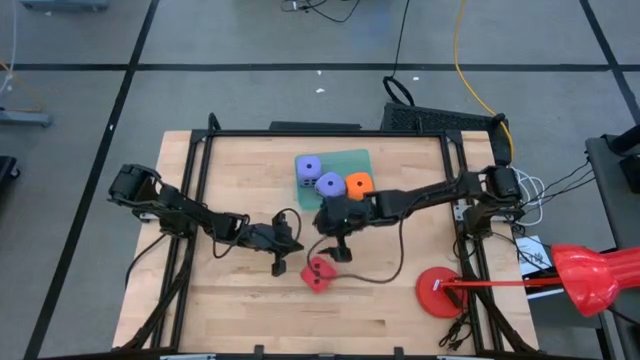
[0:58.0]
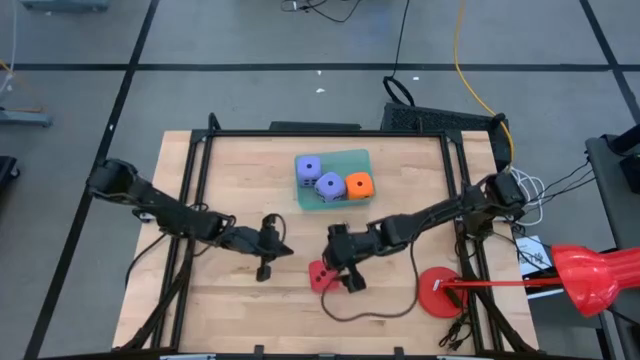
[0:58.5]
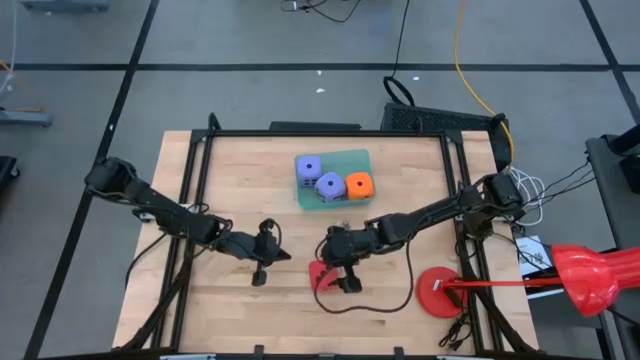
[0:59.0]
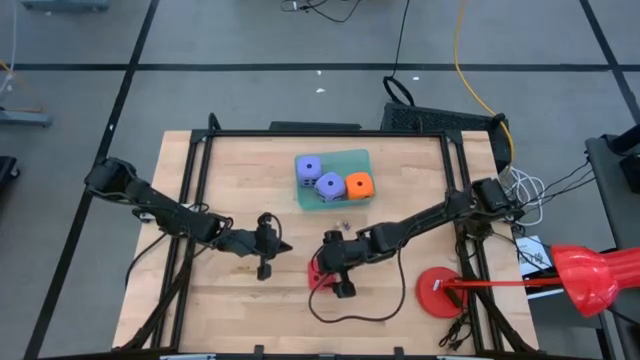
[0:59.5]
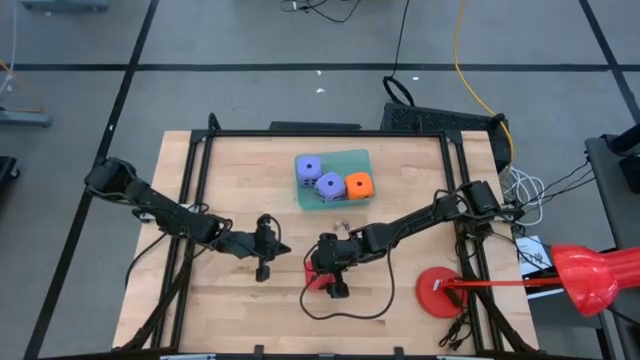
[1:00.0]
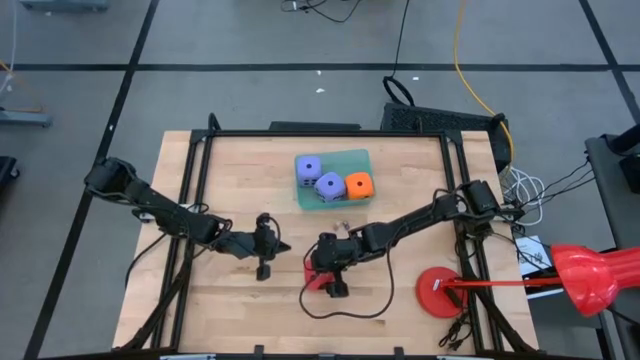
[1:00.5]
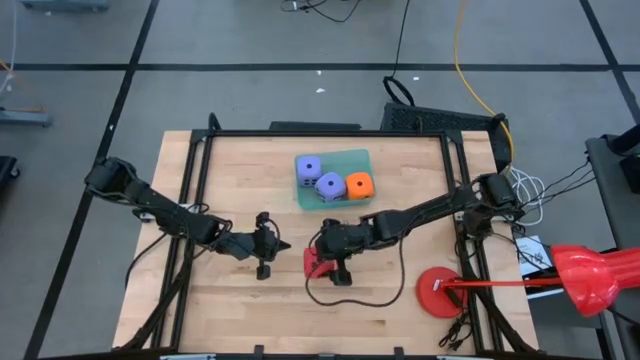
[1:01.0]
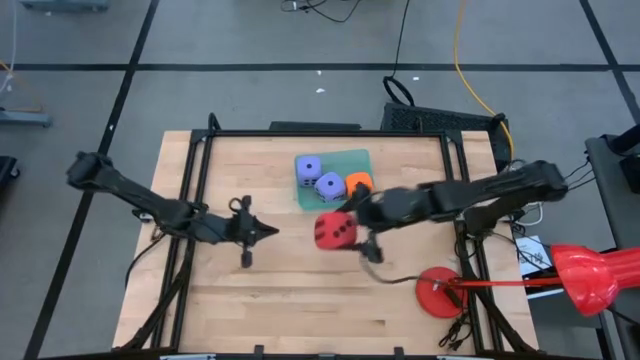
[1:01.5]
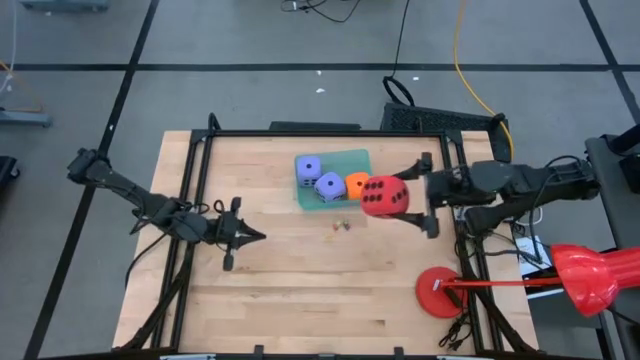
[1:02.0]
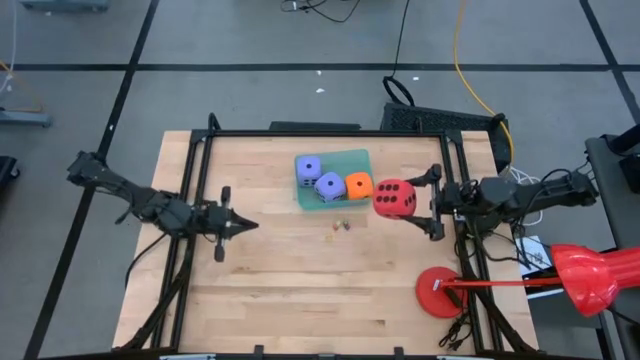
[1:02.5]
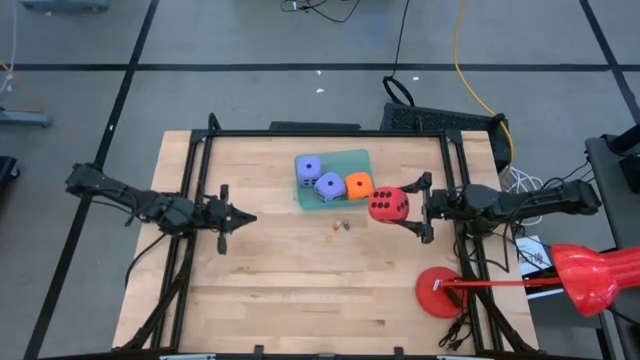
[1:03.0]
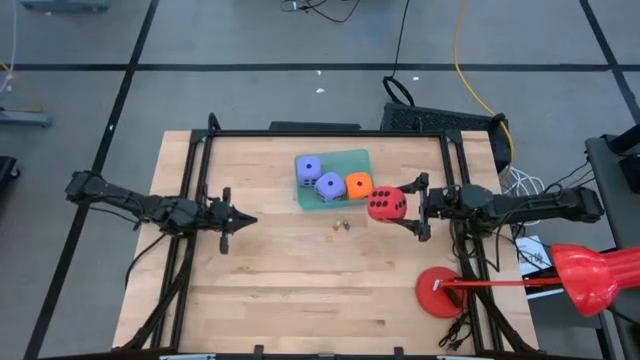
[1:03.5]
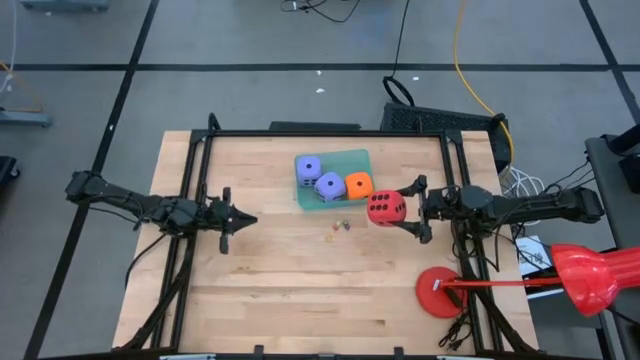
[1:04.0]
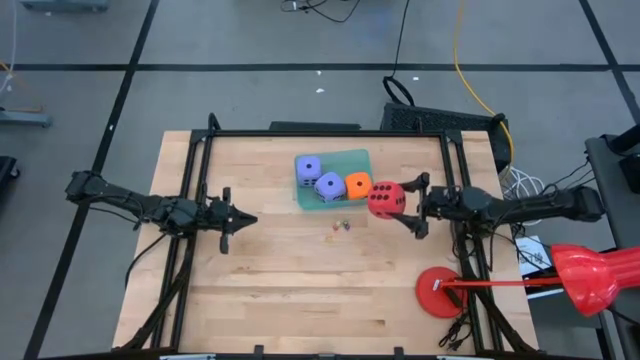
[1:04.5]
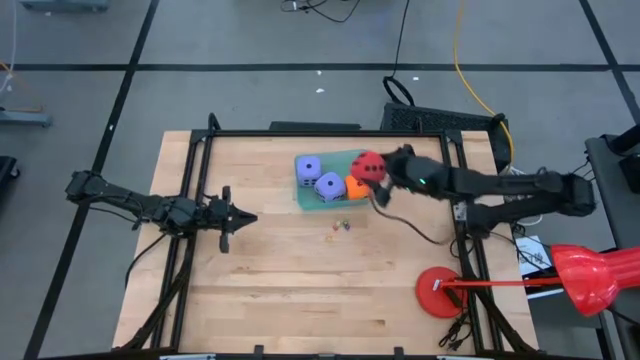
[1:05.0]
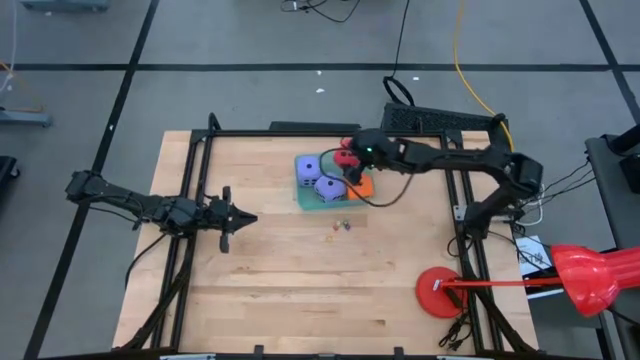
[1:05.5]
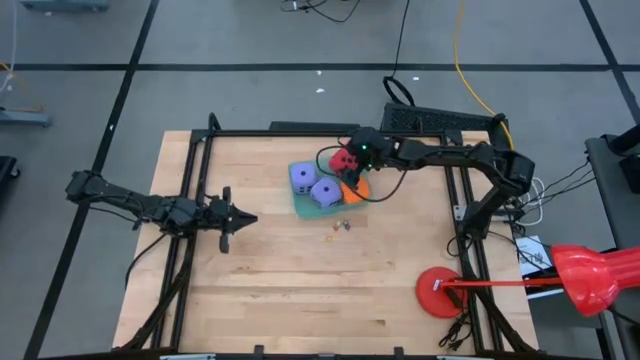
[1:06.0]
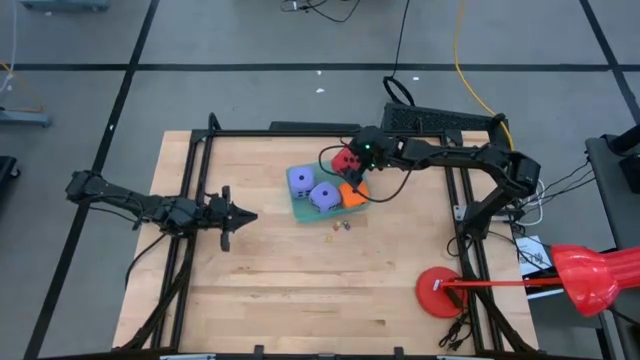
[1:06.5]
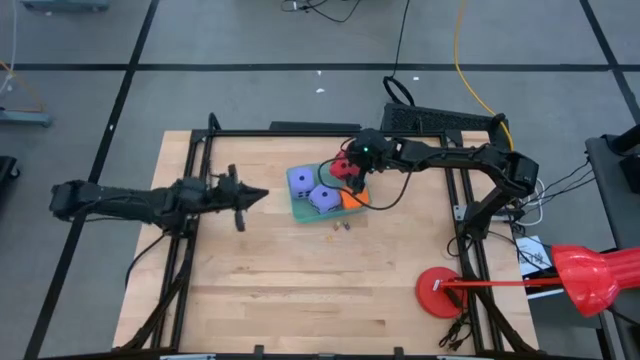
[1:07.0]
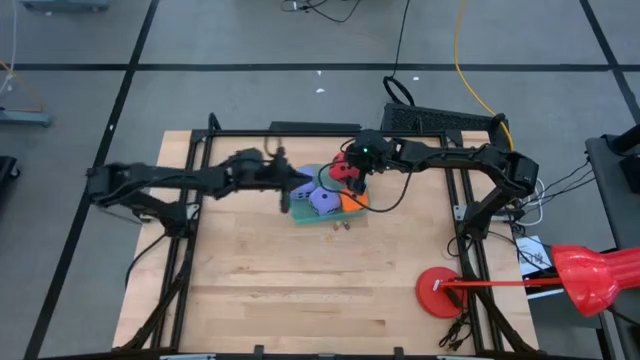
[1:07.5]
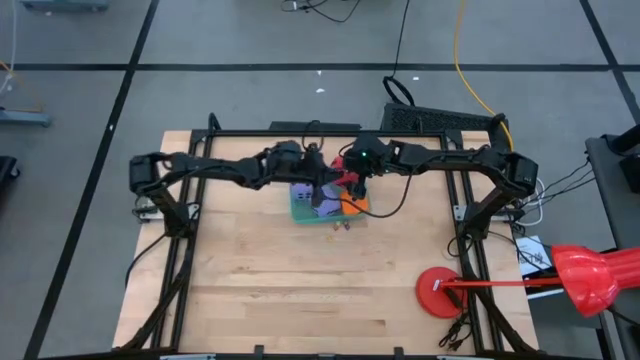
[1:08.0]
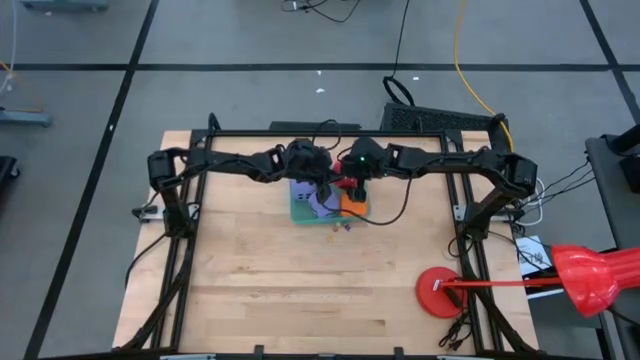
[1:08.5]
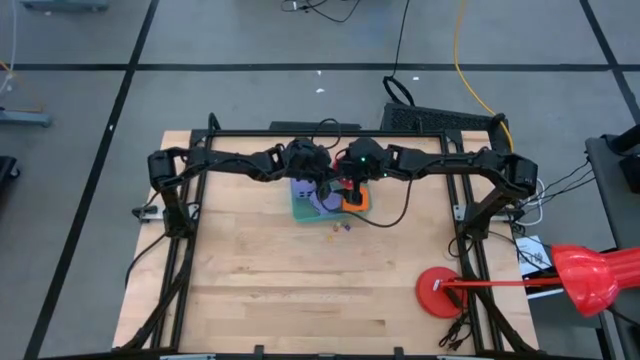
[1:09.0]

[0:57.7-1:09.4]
Task: Pick & Place Dice
Put the large red dice into the basket

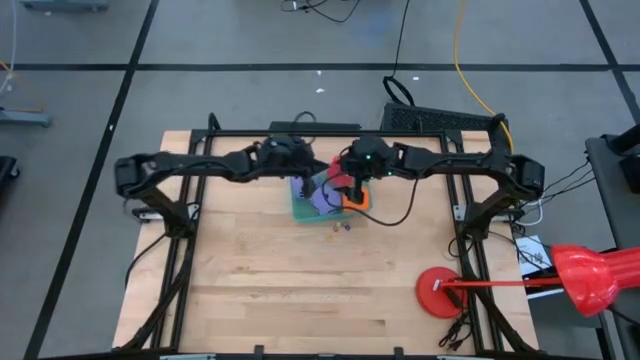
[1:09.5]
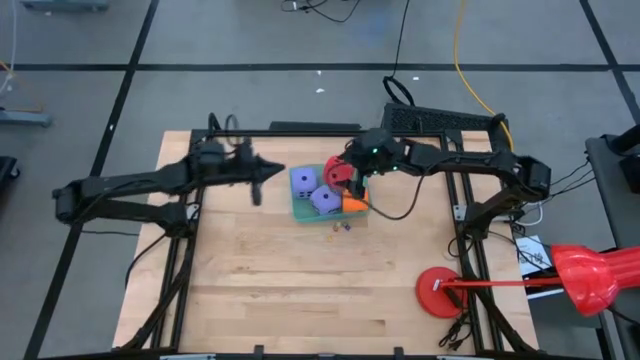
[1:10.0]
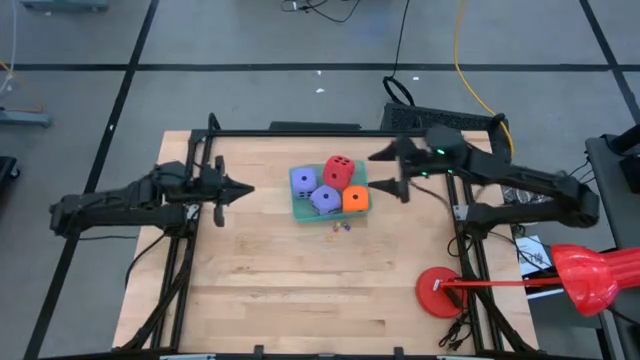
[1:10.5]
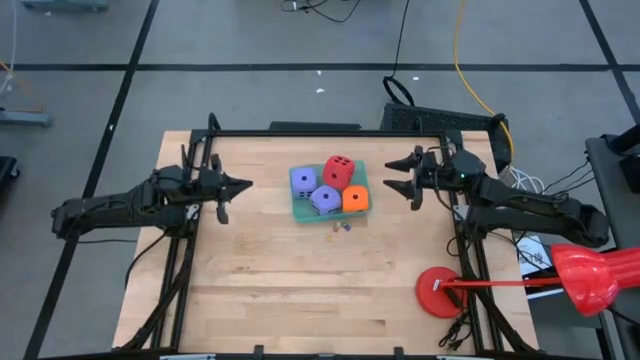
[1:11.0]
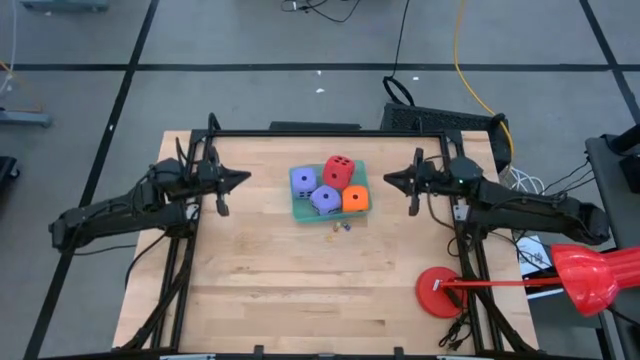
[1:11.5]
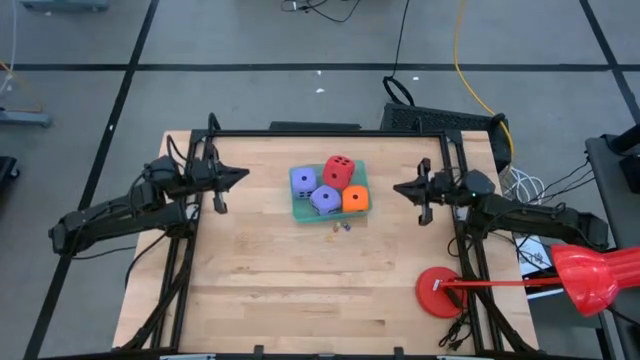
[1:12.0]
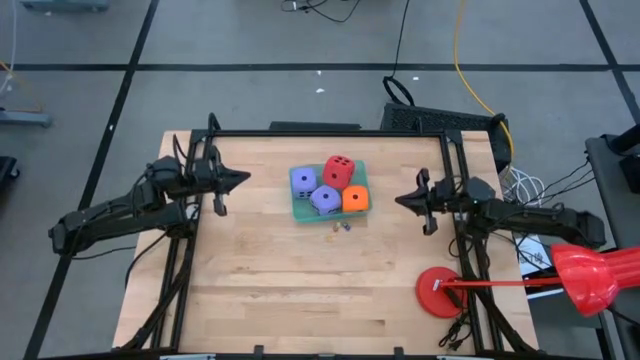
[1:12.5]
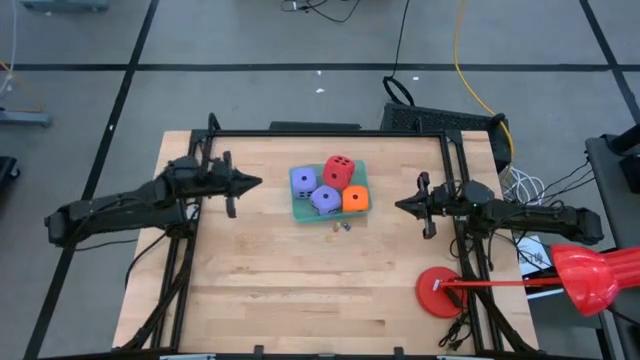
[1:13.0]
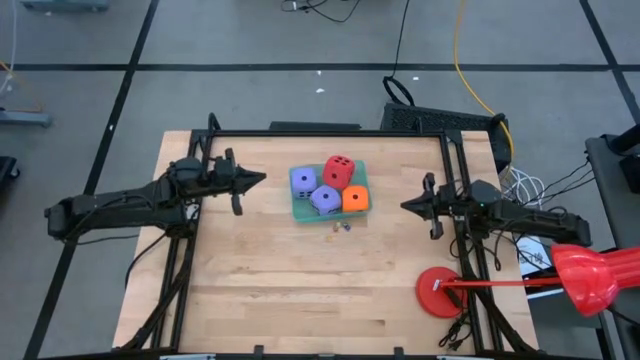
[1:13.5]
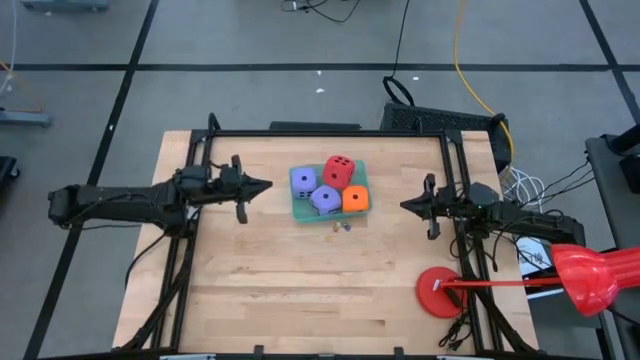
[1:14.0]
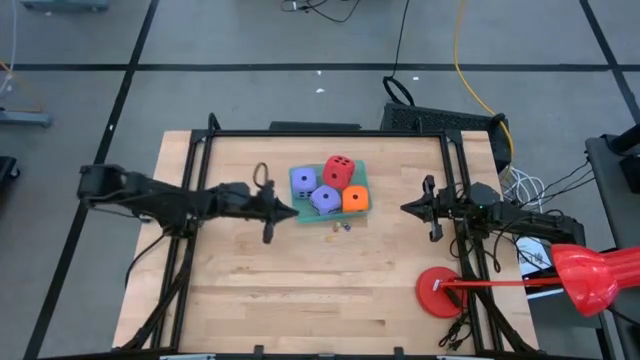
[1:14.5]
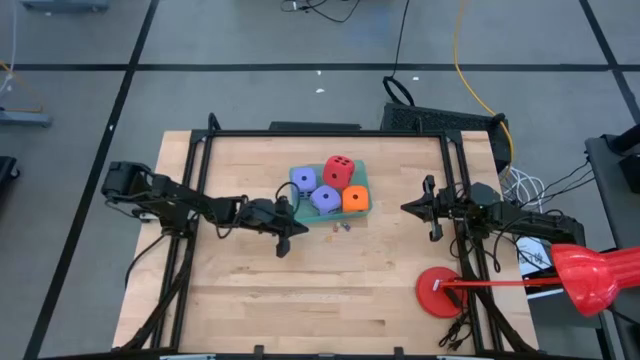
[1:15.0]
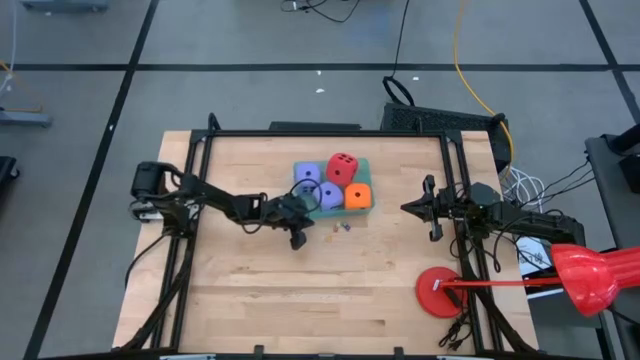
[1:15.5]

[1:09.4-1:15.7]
Adjust the basket

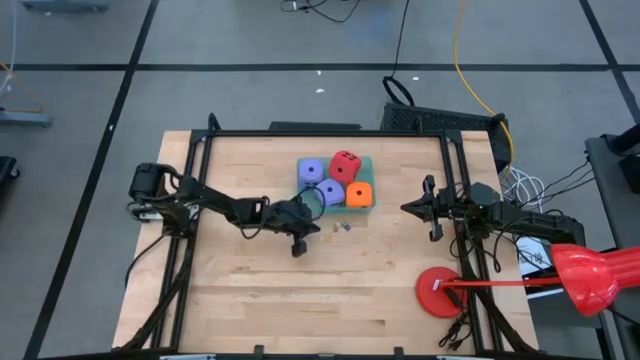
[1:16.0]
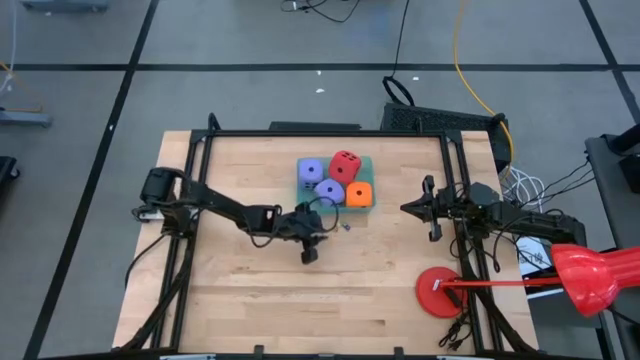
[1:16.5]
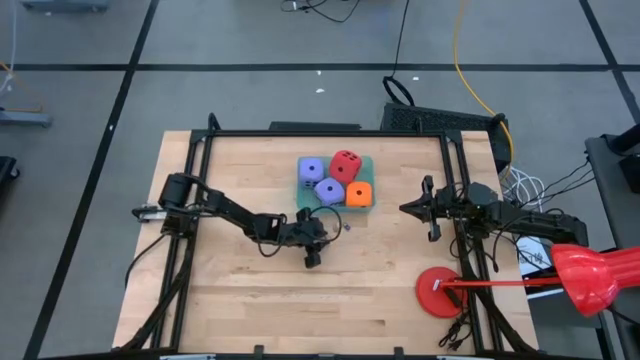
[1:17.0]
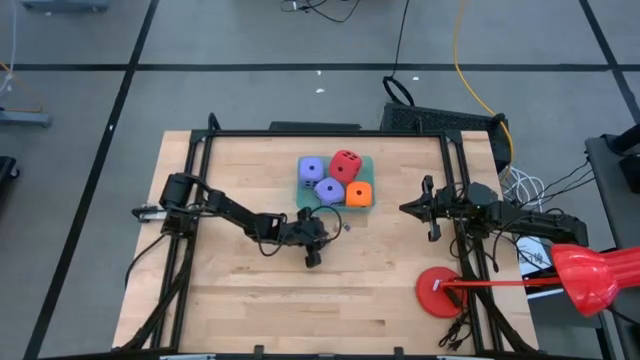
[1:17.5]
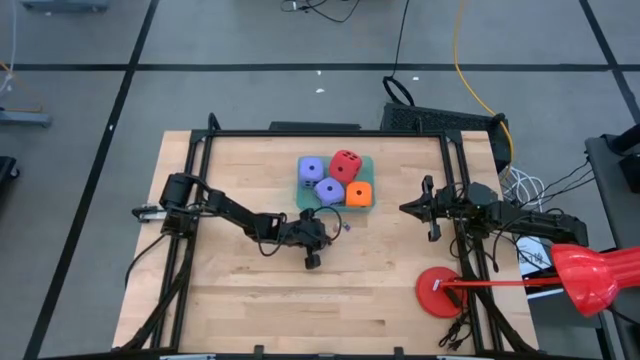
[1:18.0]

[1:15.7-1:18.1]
Put the small orange dice into the basket

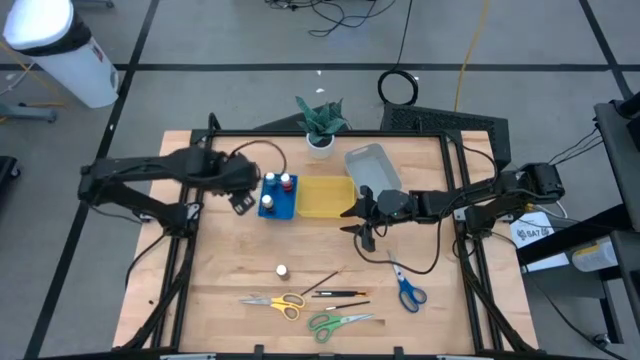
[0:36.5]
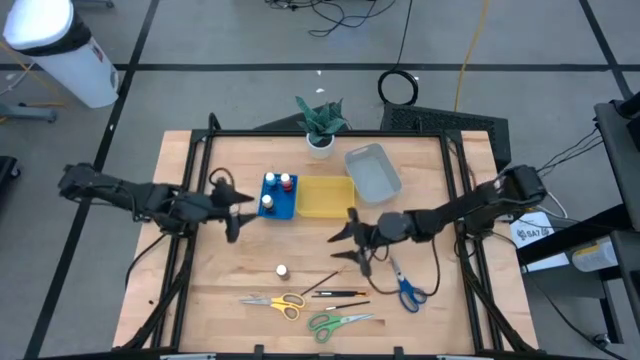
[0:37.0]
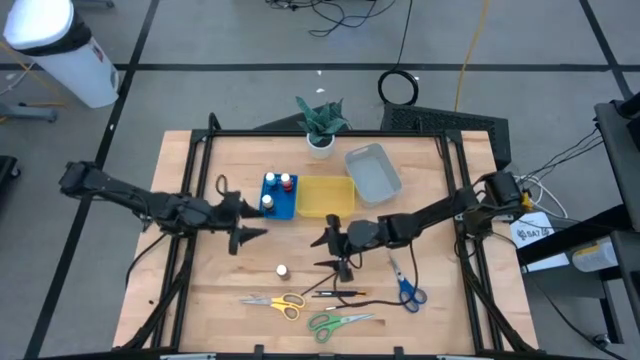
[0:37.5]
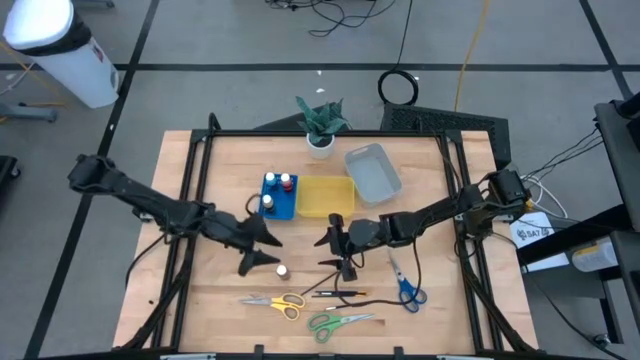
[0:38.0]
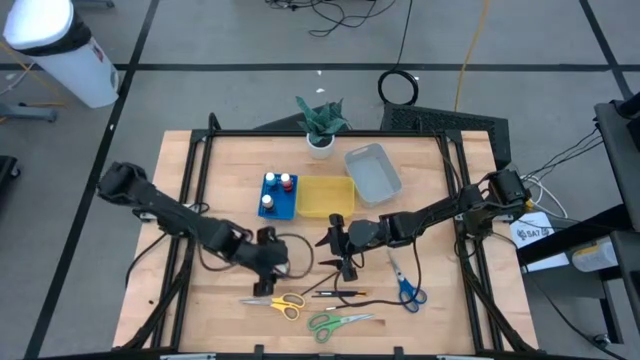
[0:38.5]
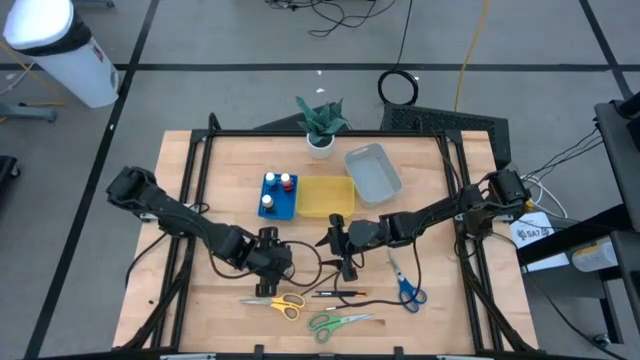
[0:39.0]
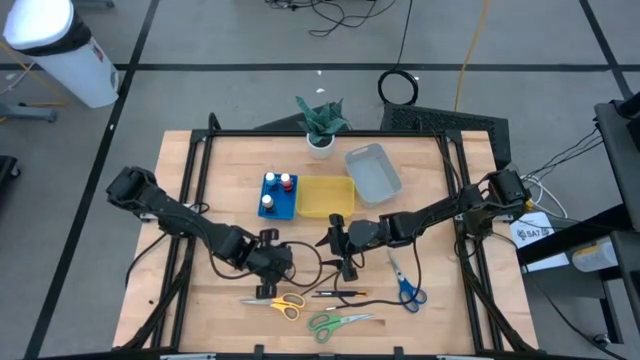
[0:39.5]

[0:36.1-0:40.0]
Task: Pick & Place Paint Supplies
Put the orange paint bottle into the blue bin
